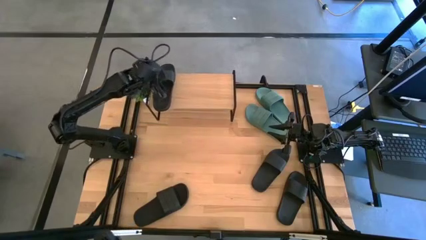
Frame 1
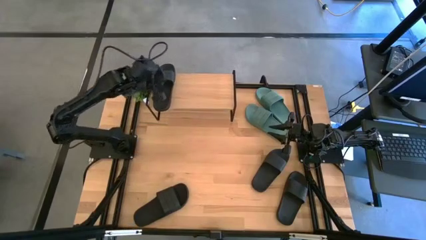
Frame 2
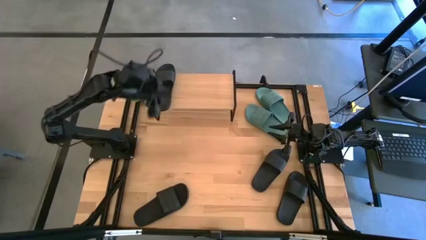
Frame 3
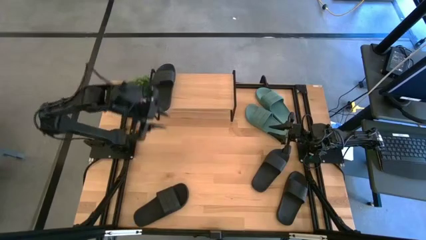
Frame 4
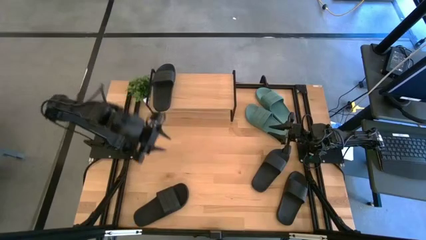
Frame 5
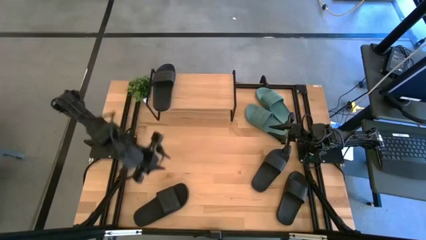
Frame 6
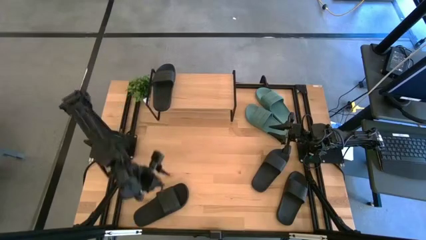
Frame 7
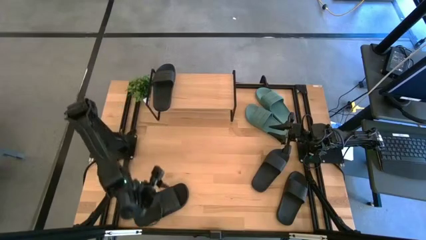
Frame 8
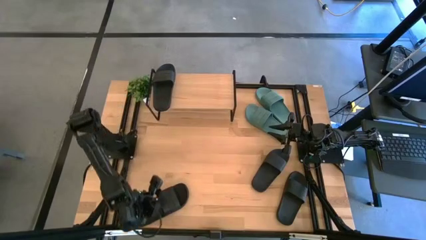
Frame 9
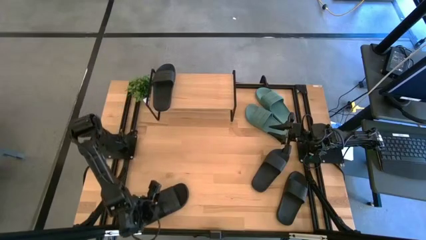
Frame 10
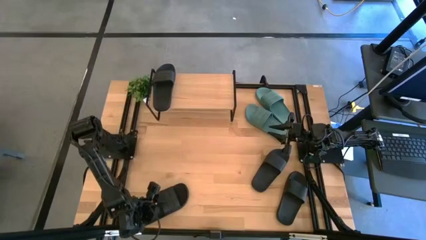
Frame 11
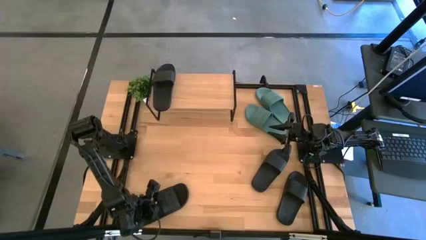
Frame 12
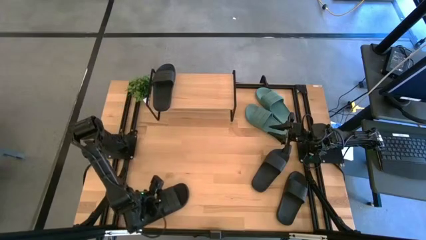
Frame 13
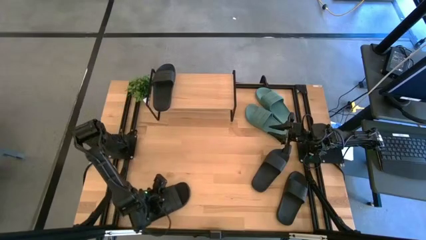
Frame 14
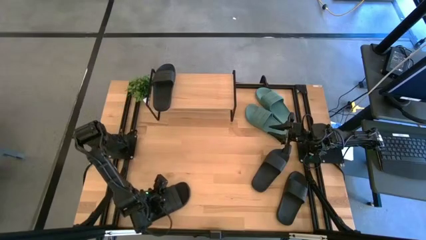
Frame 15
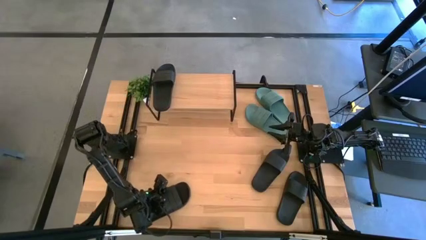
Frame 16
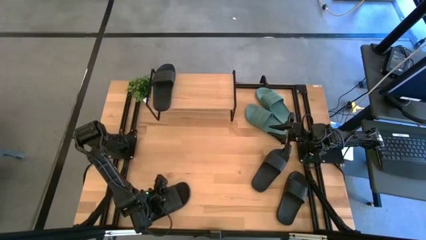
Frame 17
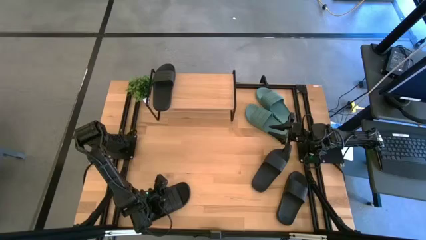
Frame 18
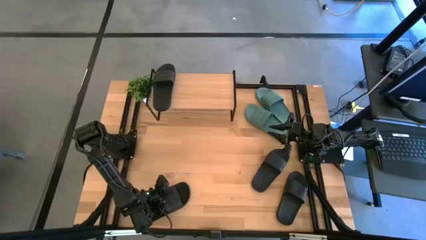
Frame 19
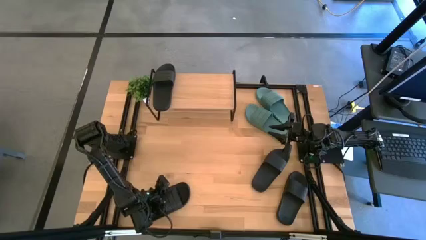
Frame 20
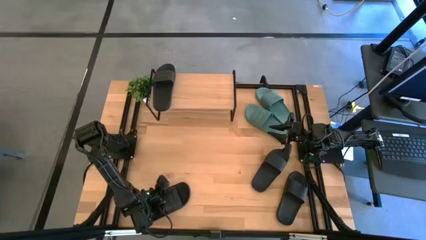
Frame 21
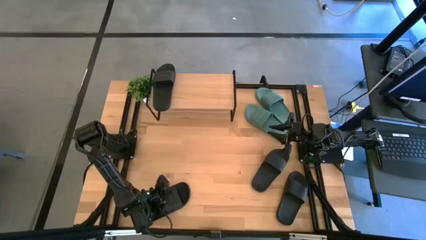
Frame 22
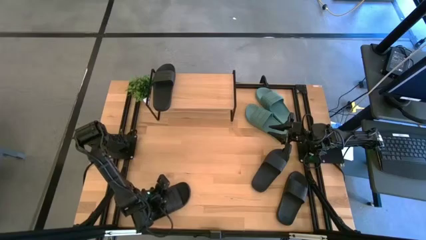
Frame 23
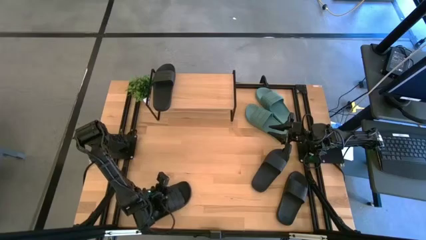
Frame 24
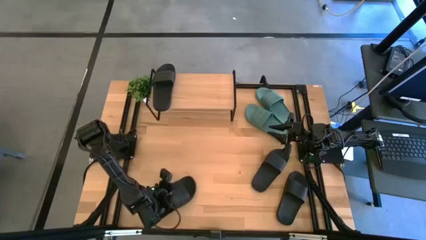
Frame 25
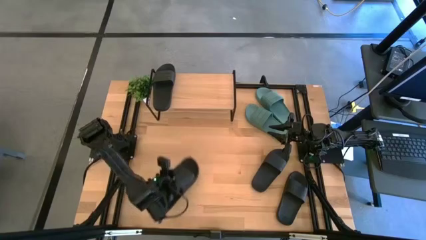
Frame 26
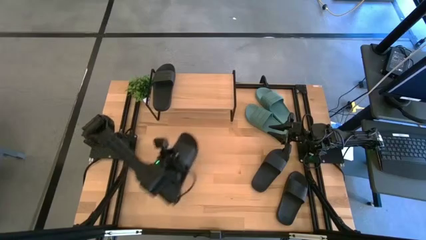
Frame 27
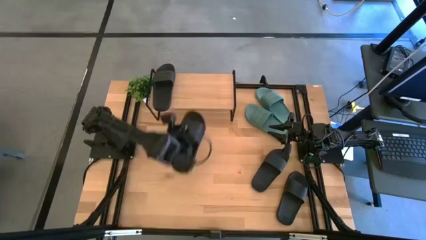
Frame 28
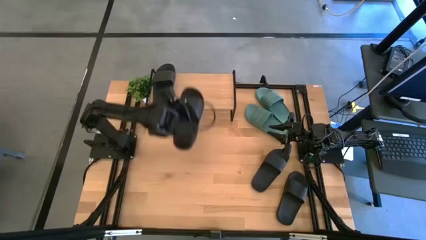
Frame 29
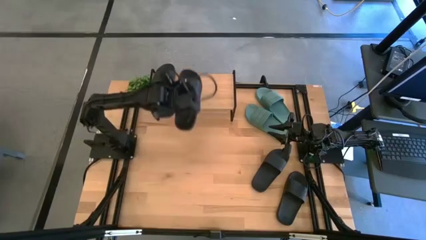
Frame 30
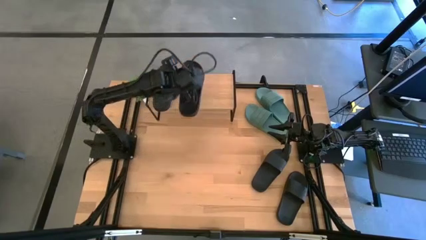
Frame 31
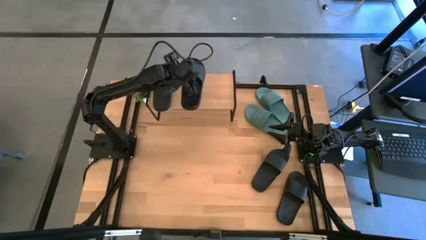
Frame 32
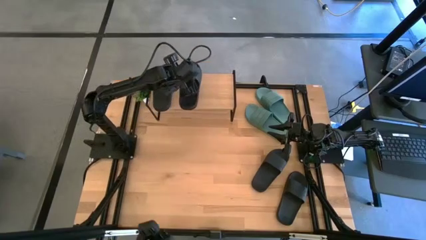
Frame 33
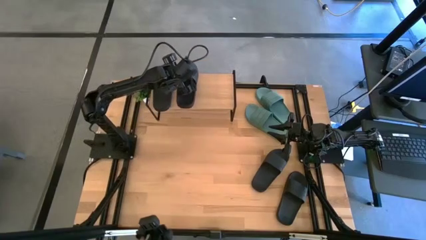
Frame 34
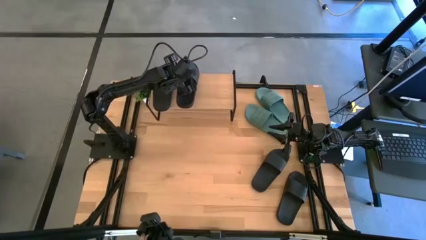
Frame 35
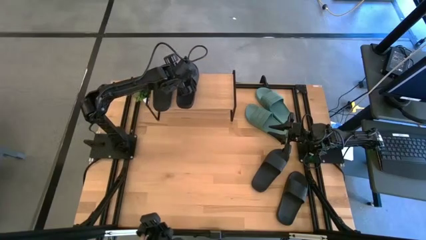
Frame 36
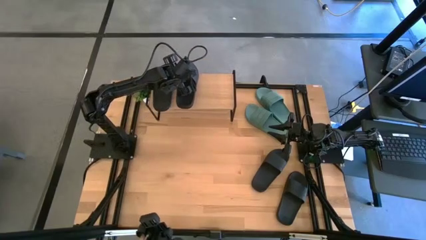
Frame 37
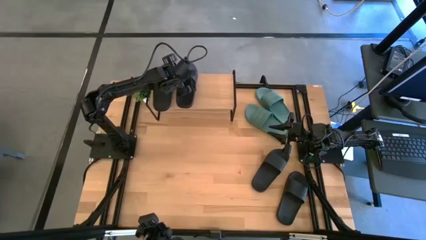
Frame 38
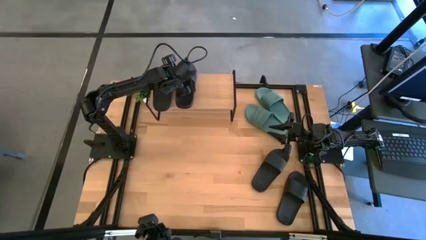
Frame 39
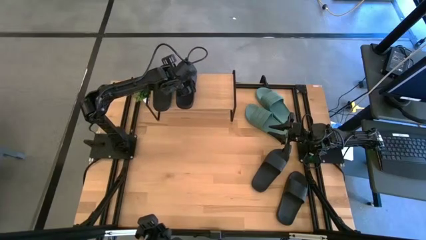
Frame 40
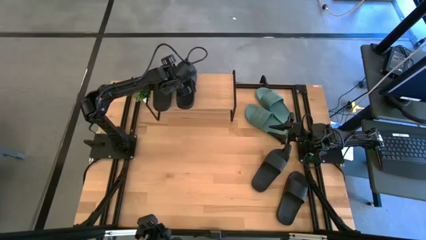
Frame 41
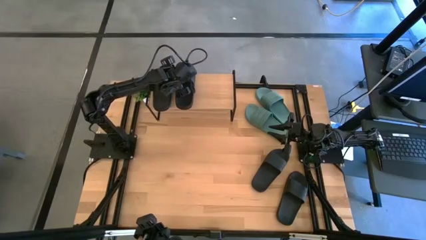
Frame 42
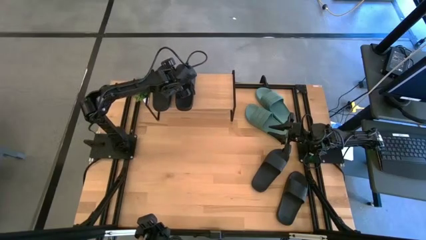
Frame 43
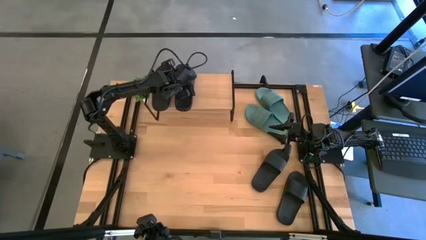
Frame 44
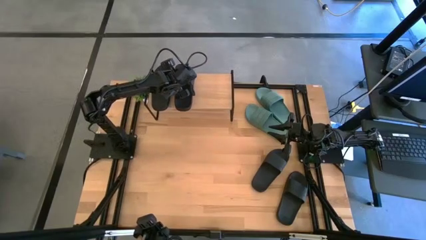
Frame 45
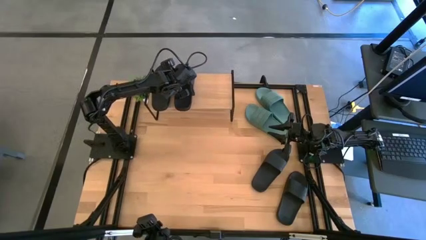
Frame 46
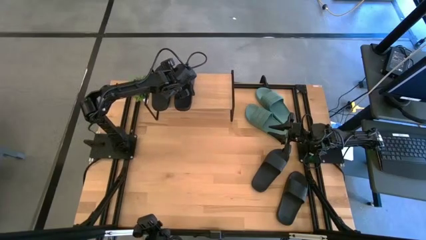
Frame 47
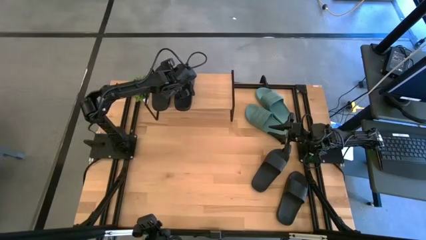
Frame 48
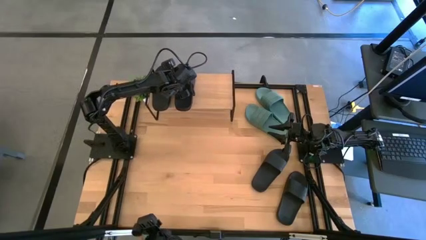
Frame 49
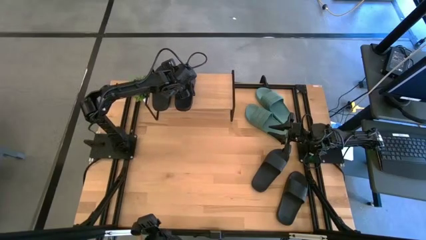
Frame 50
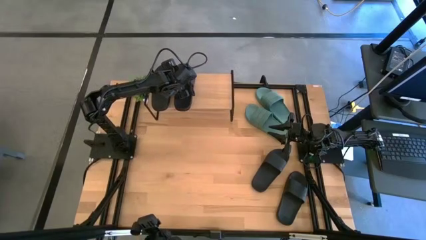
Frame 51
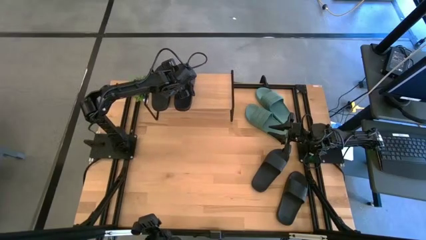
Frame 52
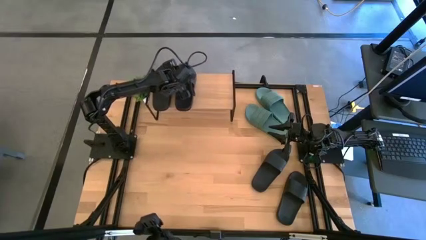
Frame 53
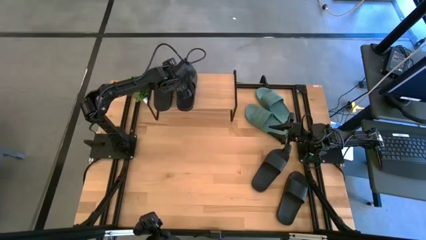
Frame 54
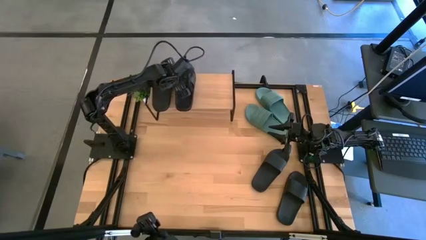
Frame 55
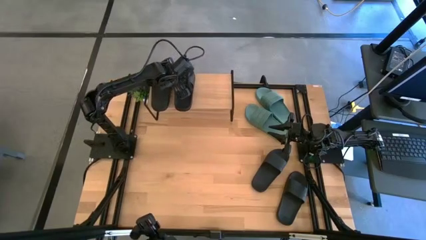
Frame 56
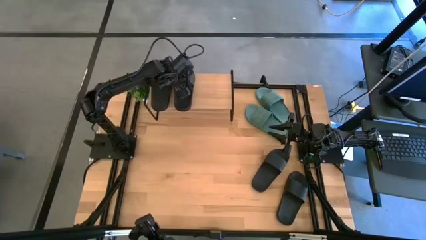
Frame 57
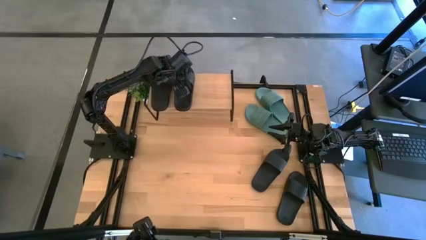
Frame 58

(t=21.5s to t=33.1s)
Task: Pick and place slides into the shelf
Put the black slipper on the shelf
